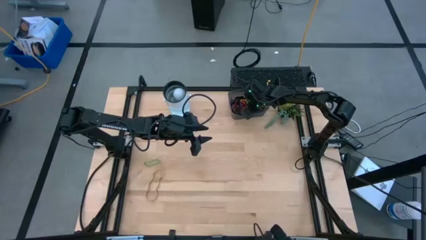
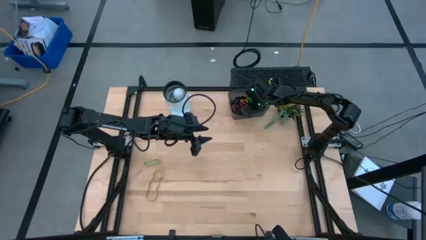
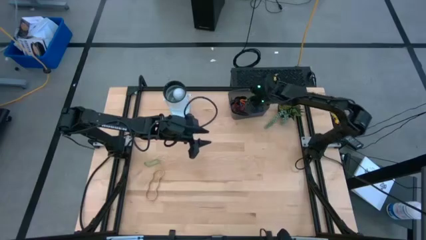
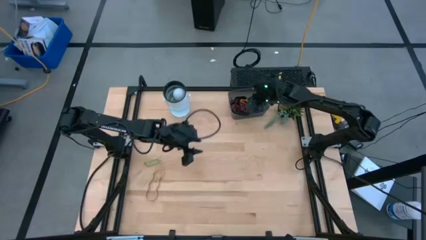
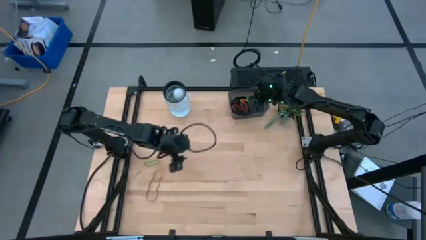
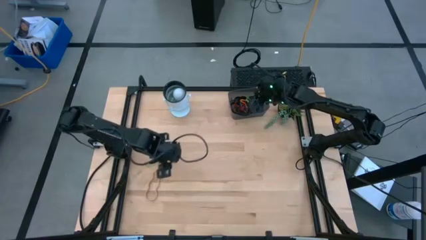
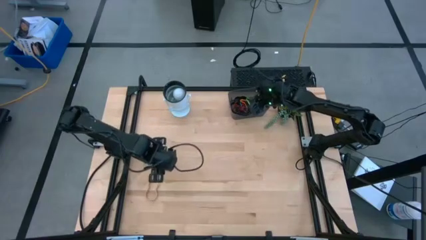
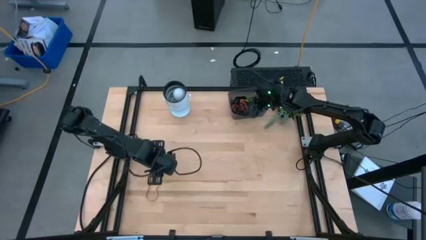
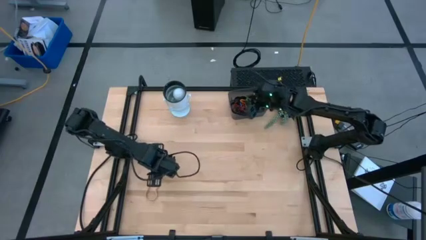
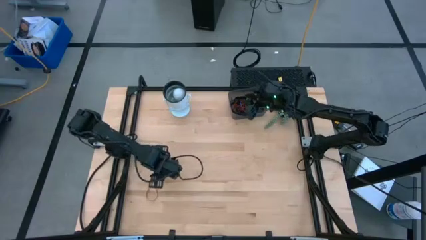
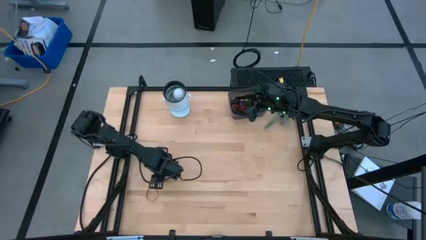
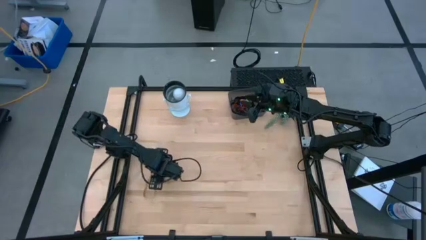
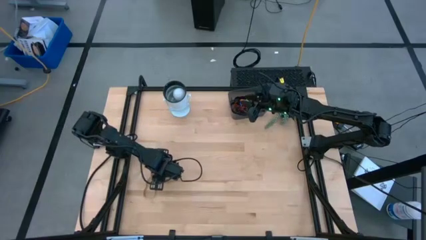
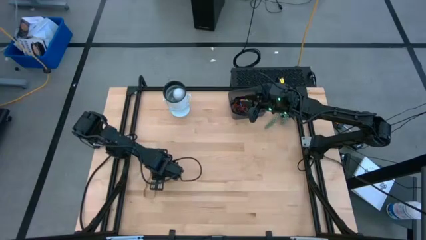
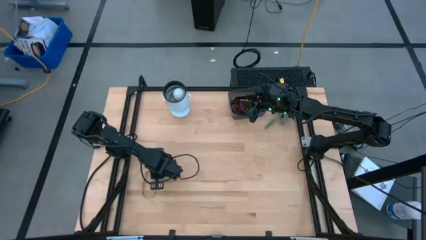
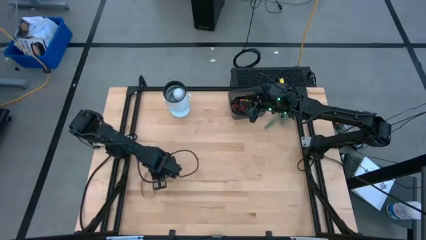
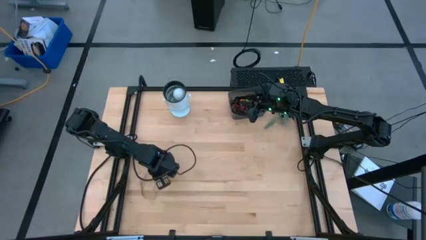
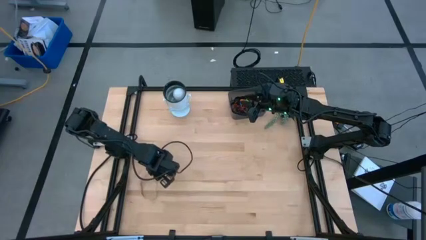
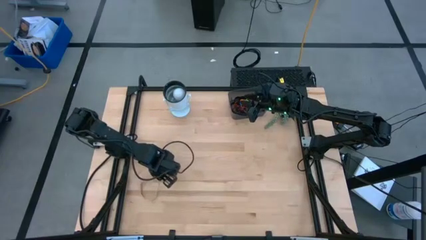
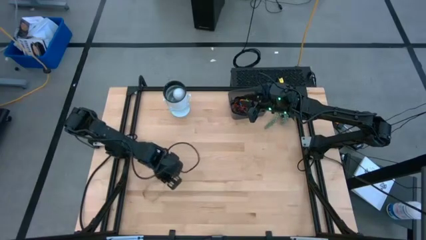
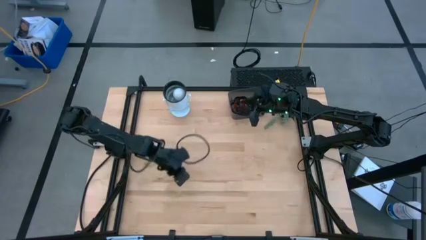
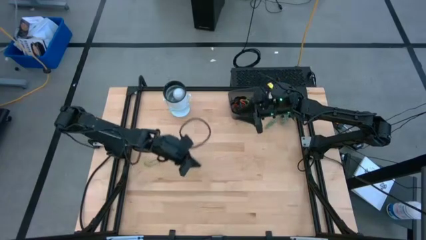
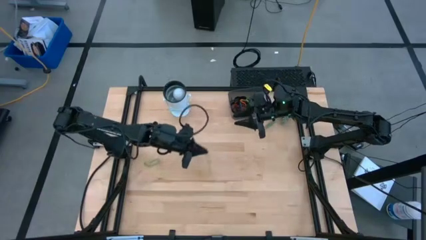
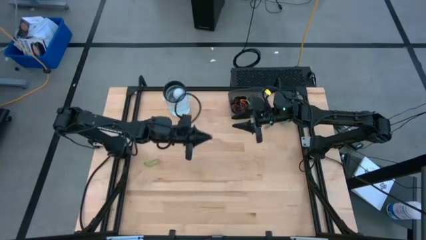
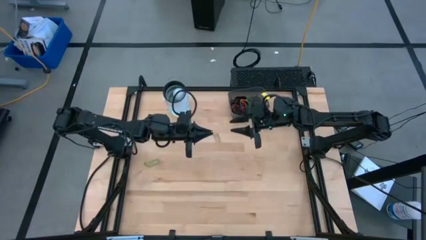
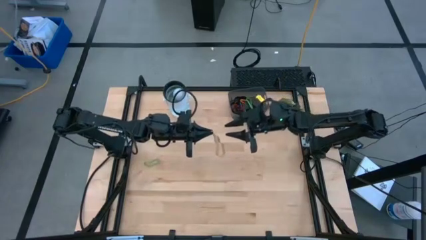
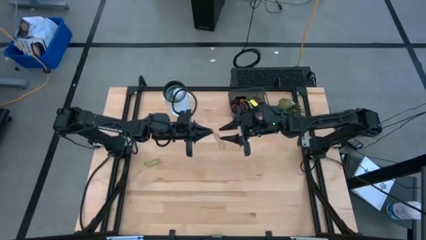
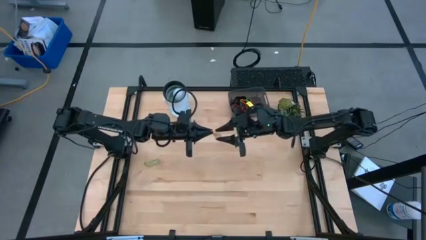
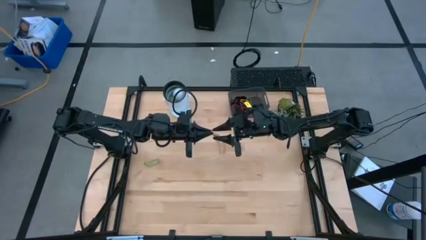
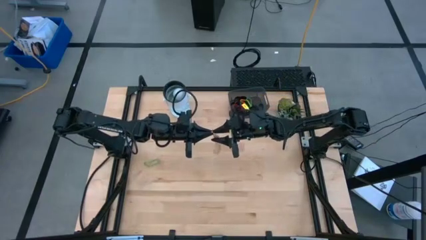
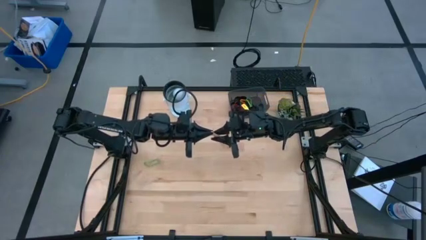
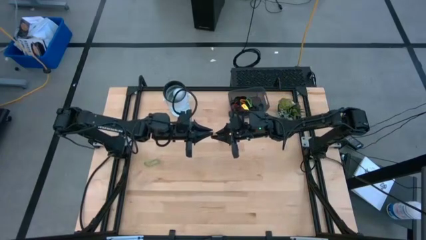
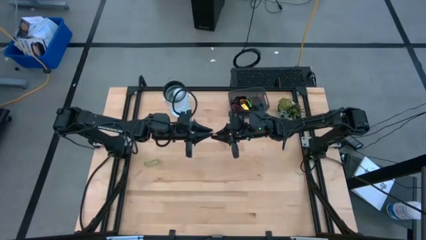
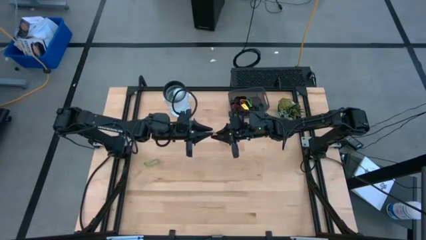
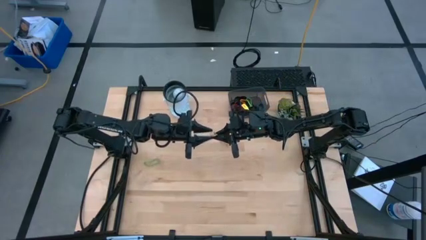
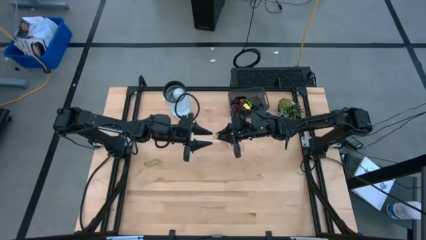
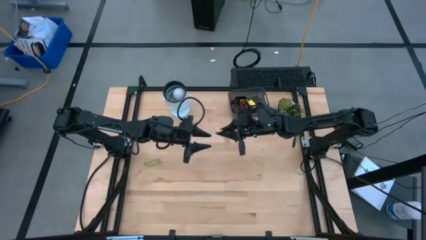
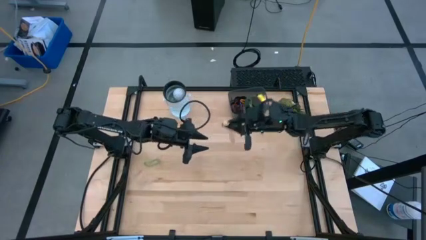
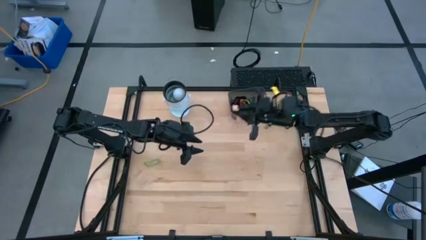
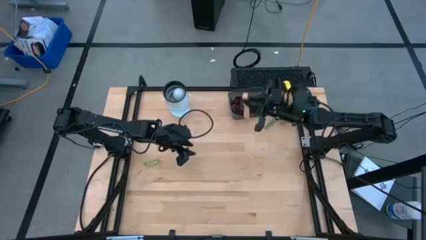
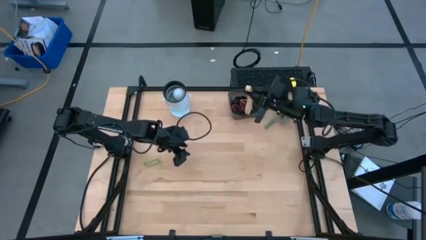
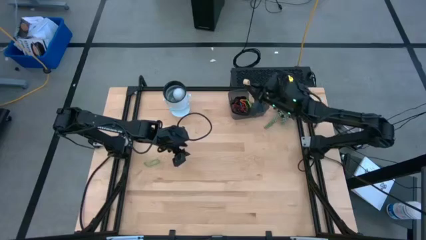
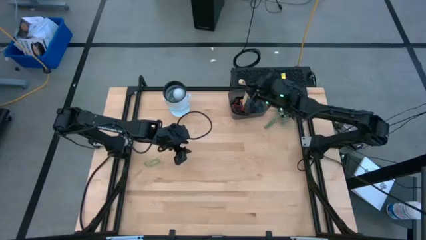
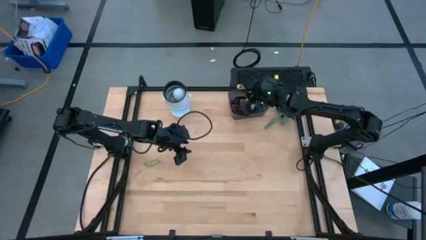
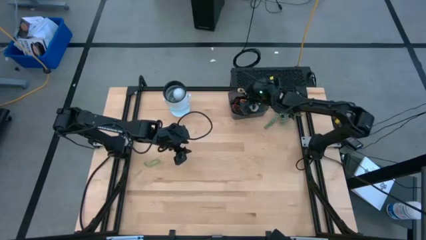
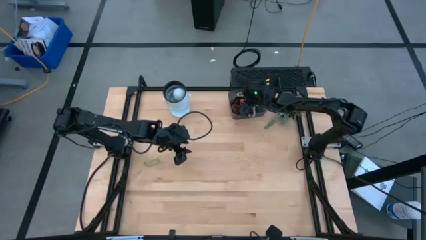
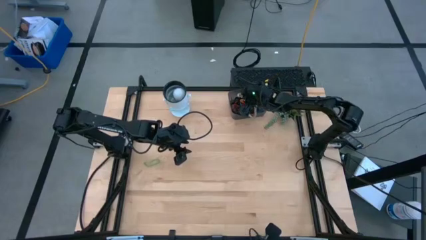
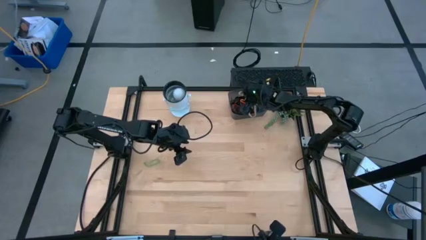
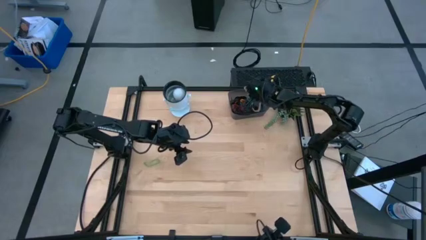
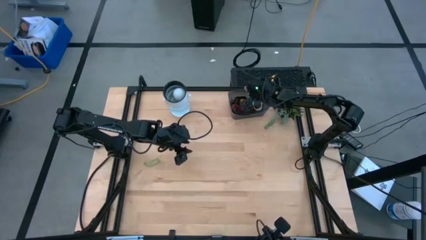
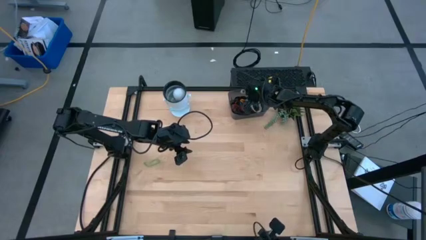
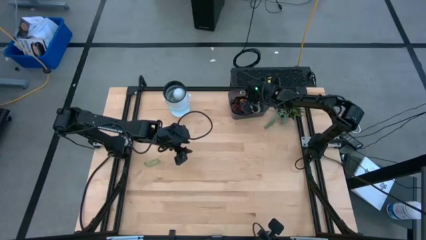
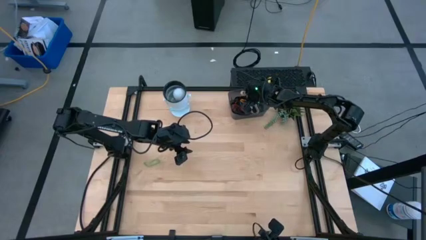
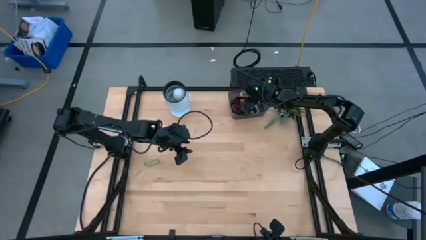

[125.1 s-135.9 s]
Task: Pick and place rubber bands into bin
Put the brown rubber band into the black bin

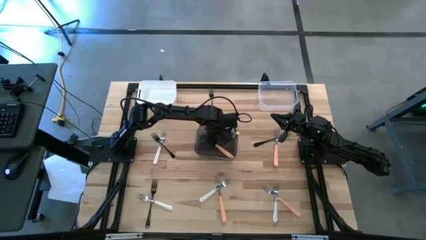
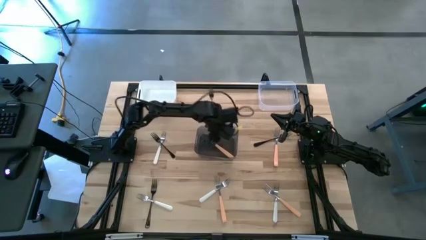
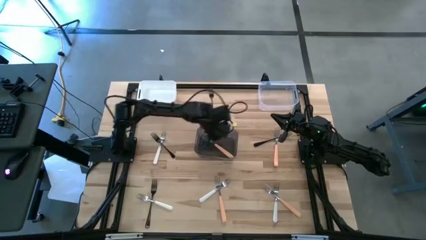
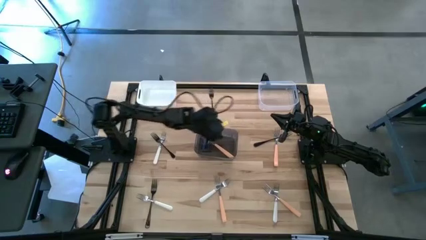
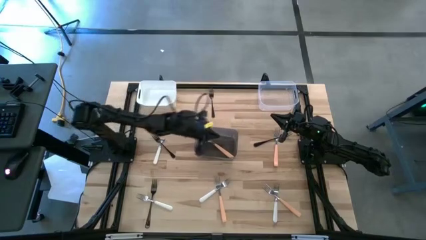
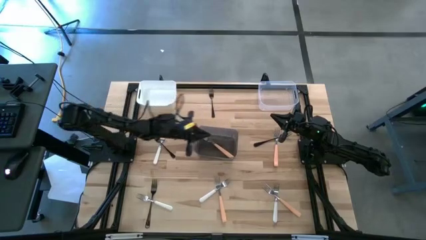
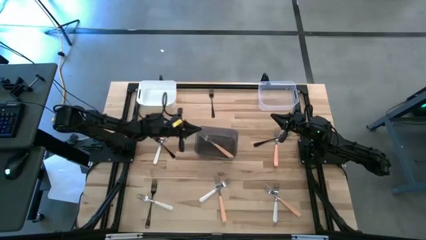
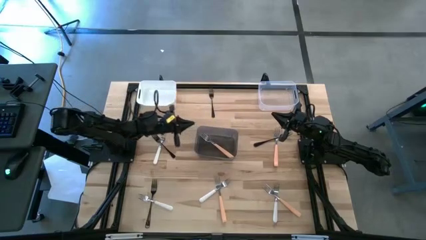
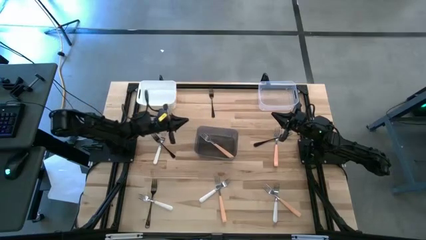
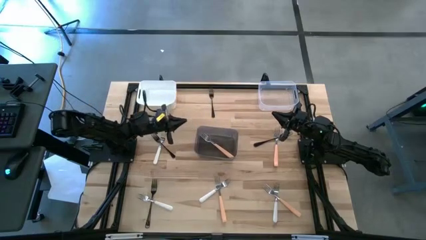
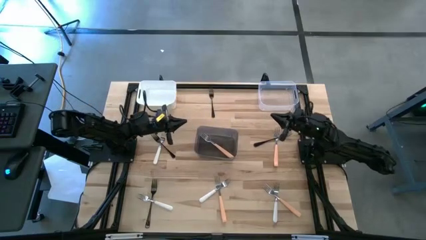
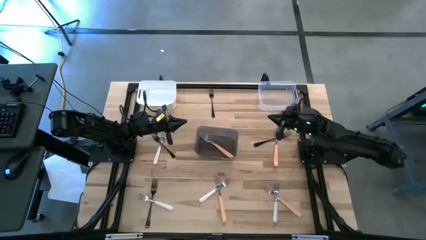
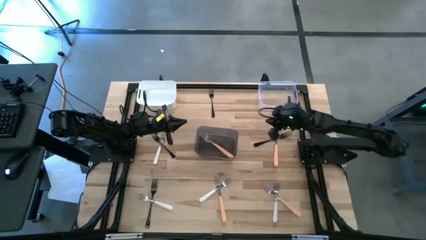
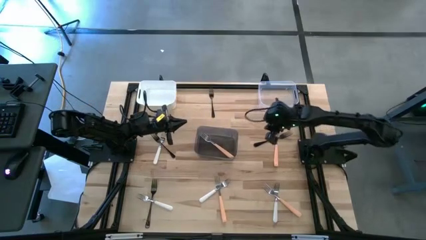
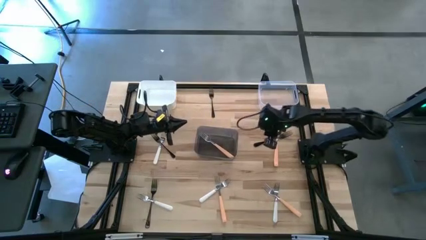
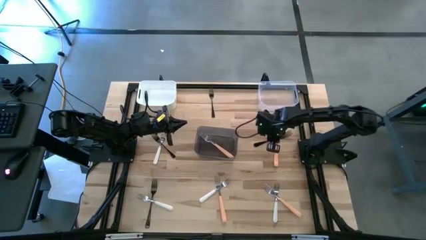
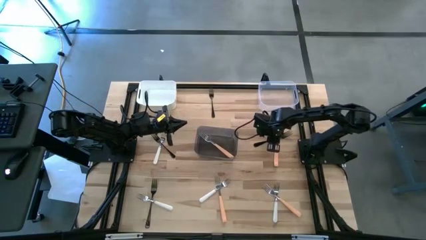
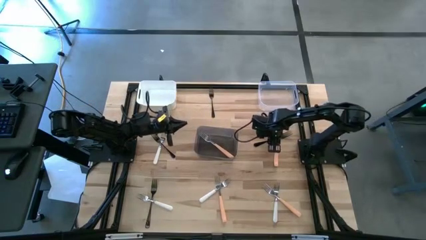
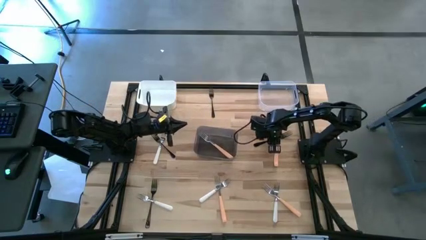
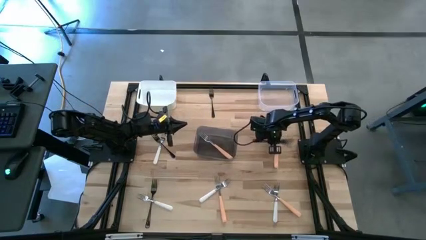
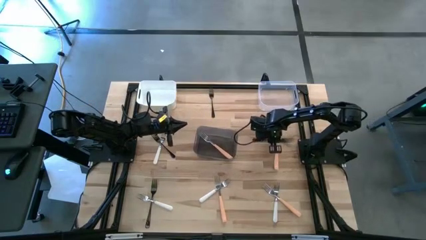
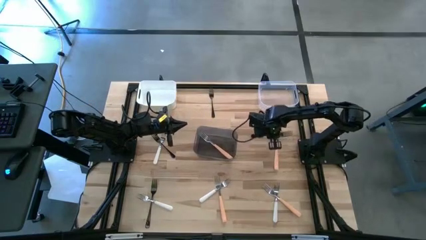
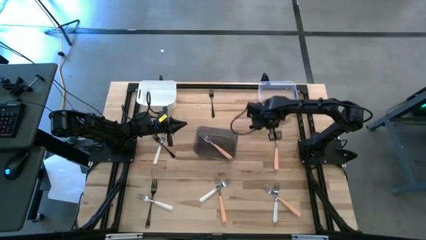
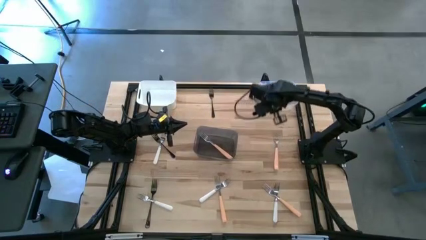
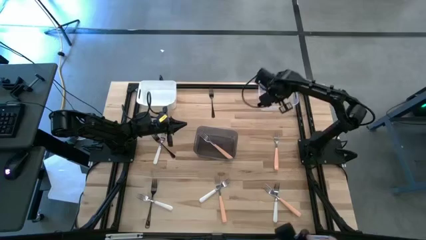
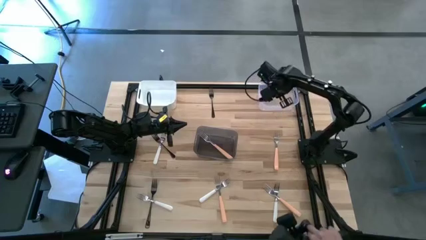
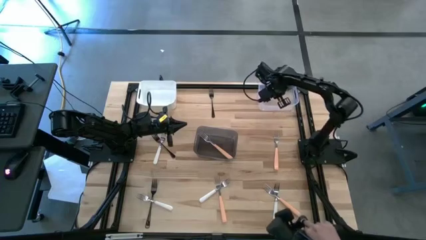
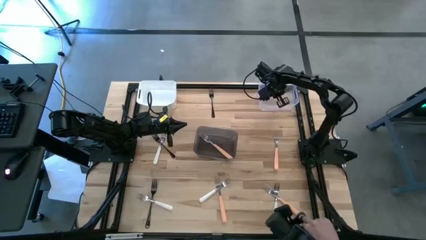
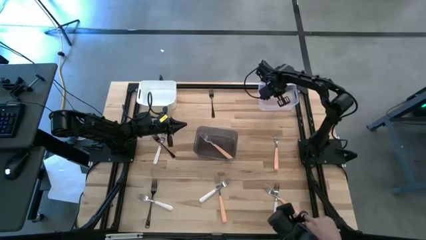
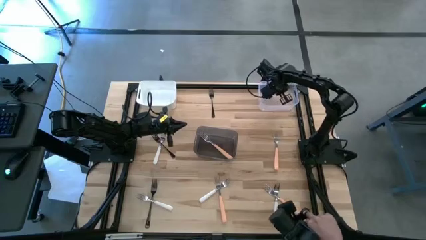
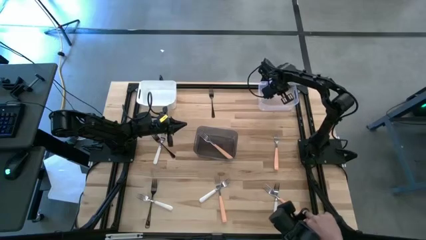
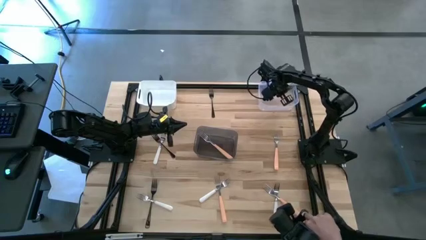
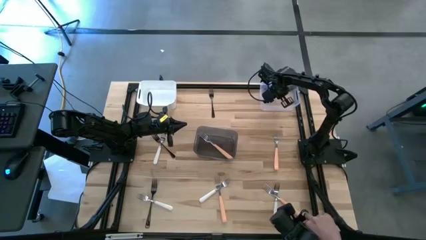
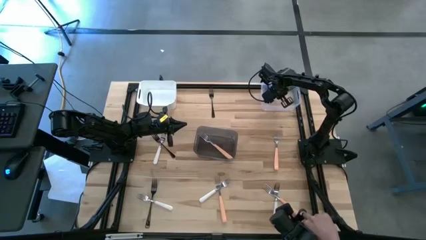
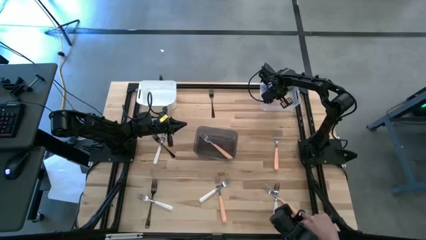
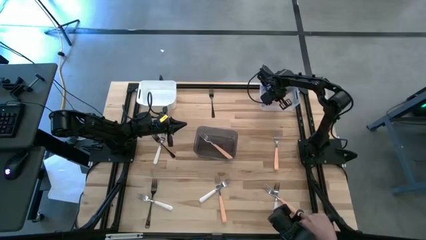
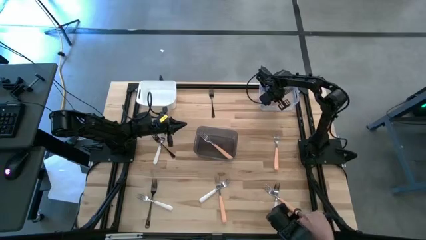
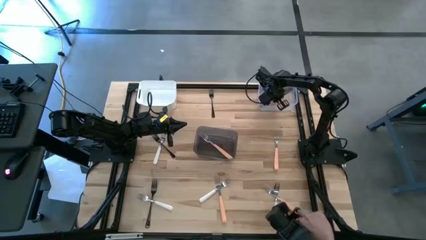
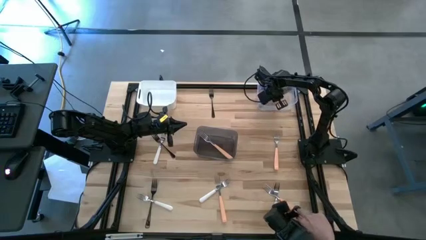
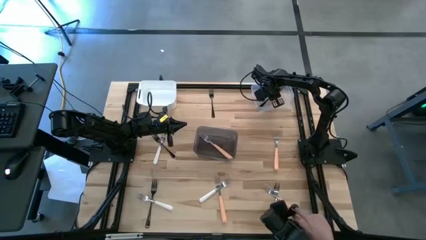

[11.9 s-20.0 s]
Task: Sort silverware by color (type)
Put the middle right black fork into the transparent bin
